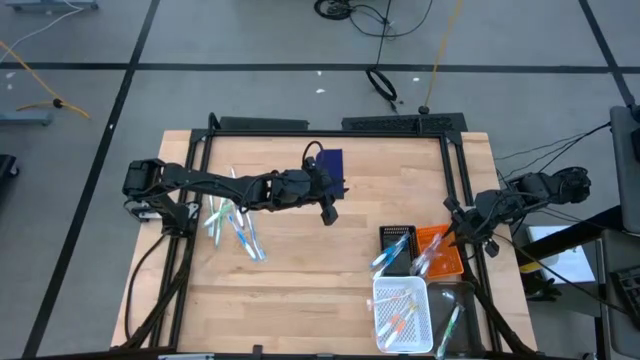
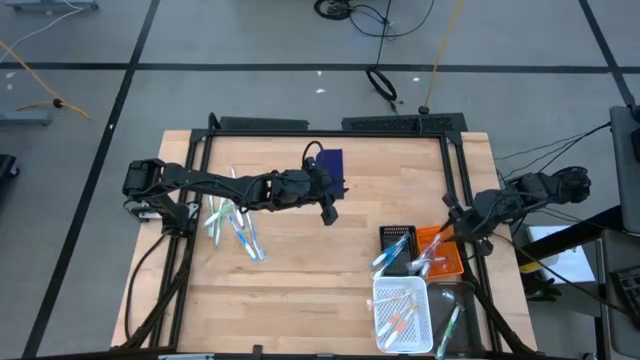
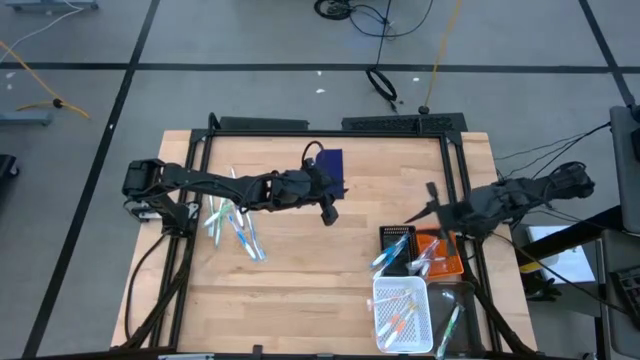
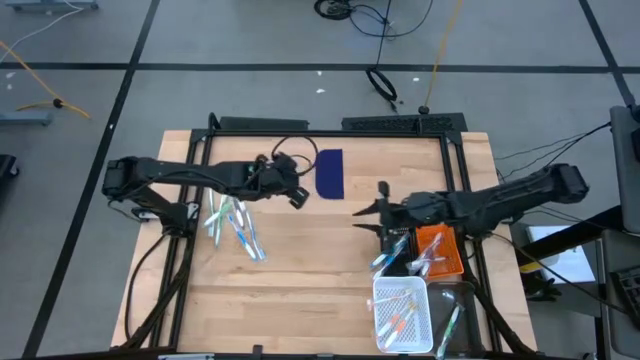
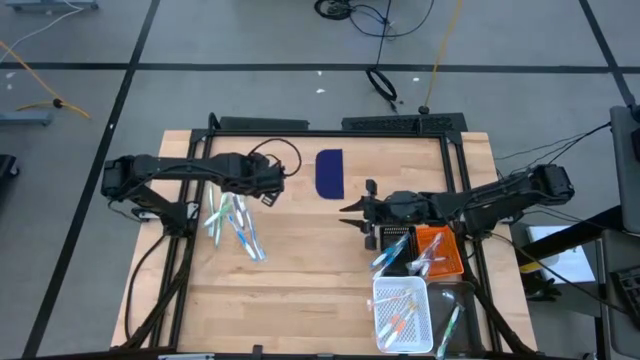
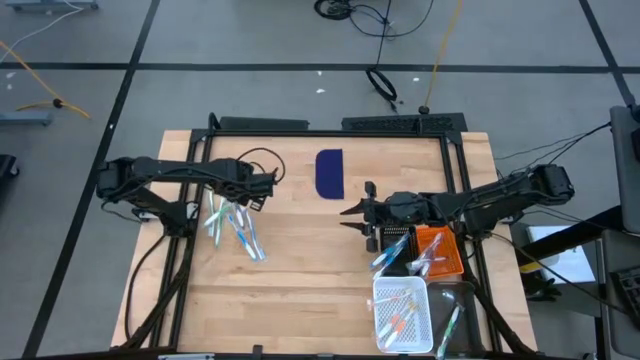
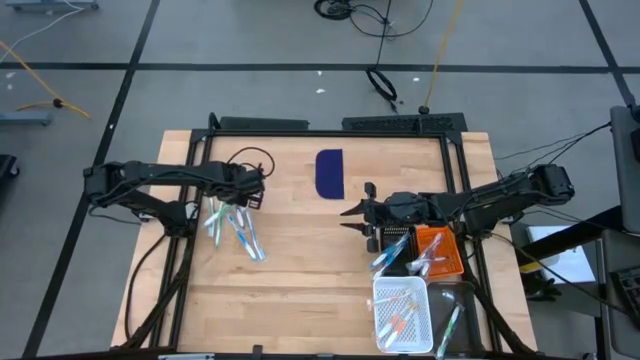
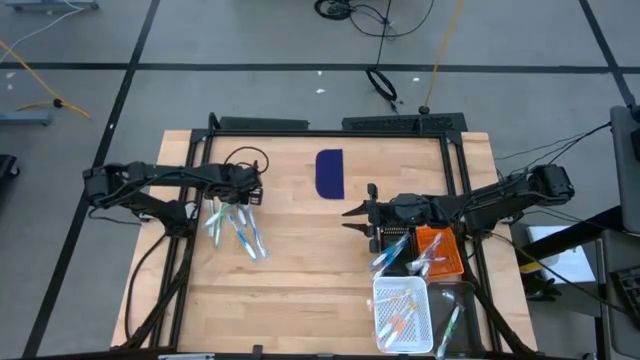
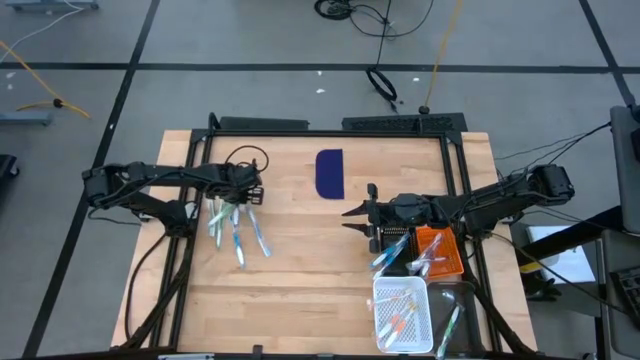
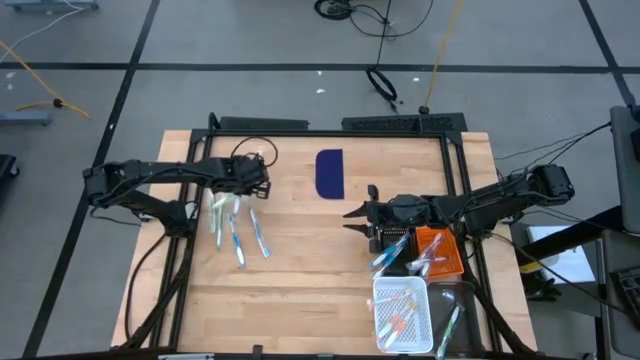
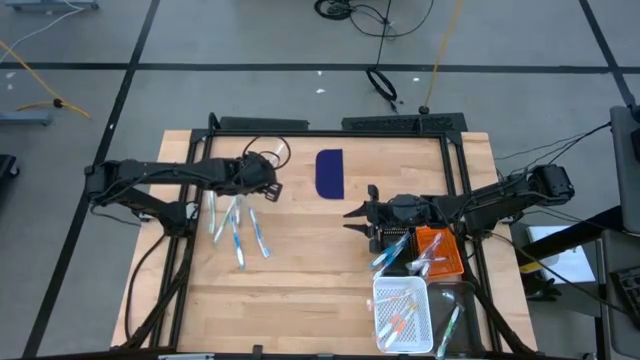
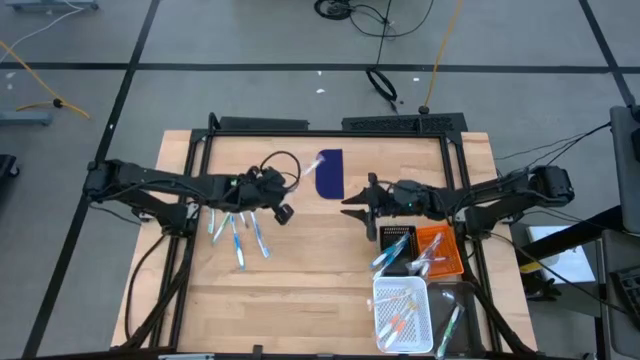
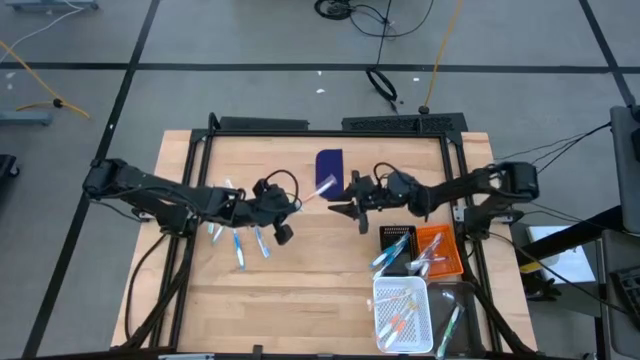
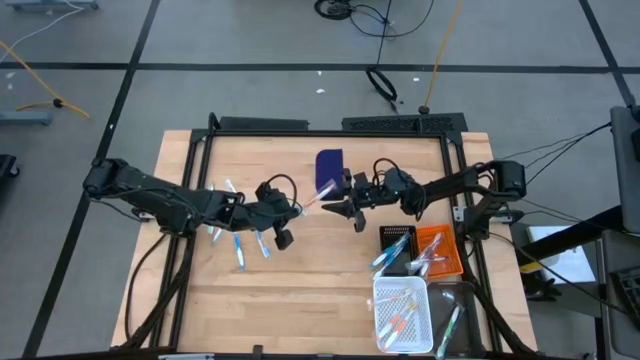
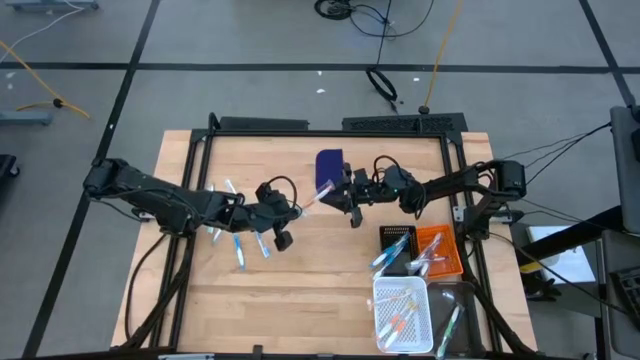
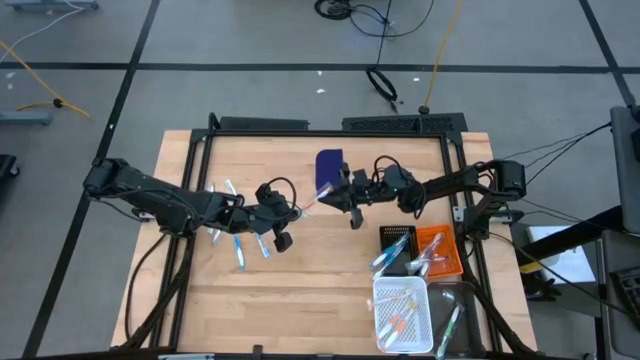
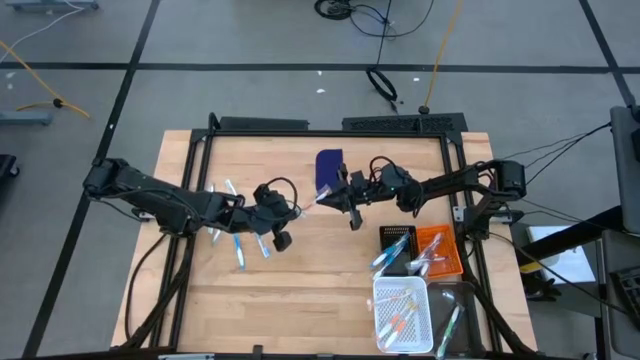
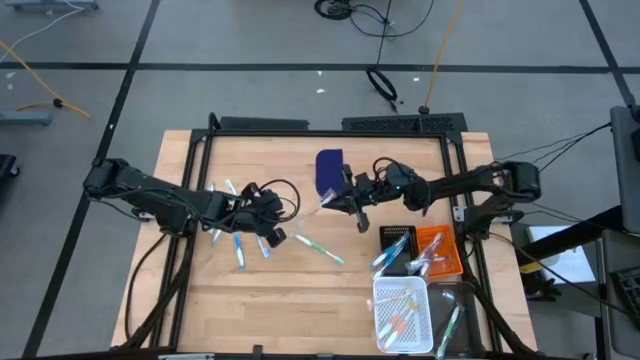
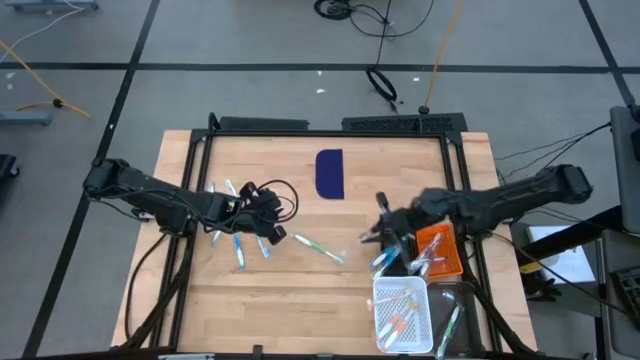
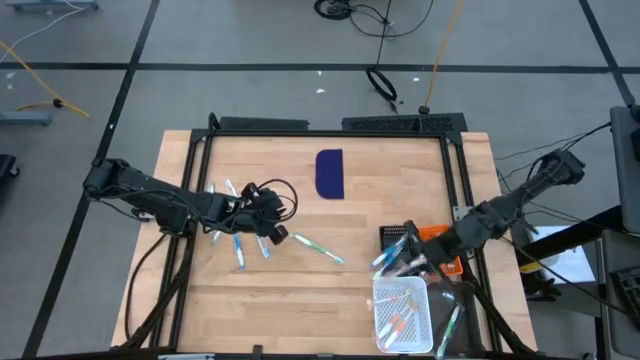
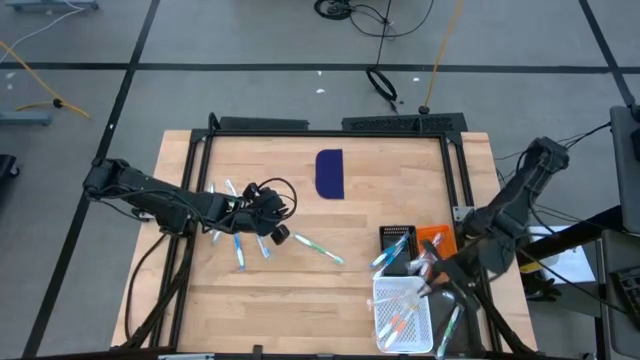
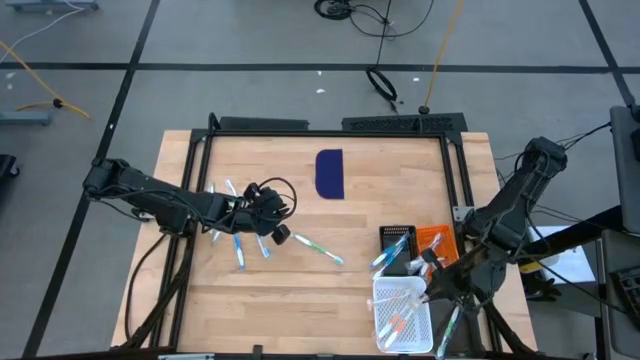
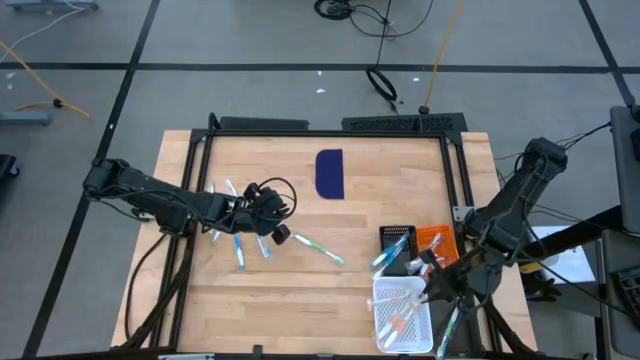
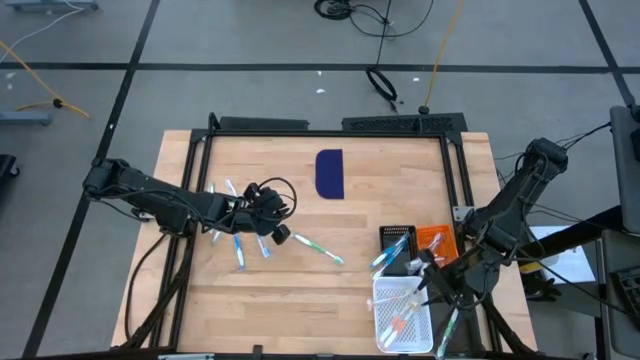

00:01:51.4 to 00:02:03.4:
Task: Pick & Place Toothbrushes
Put the orange toothbrush into the white bin

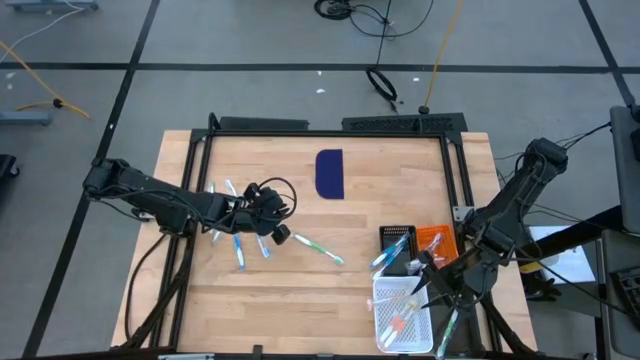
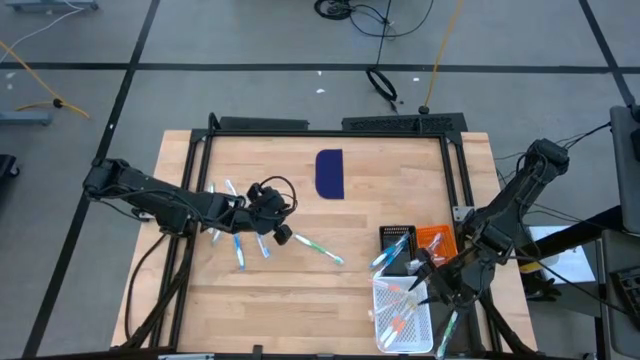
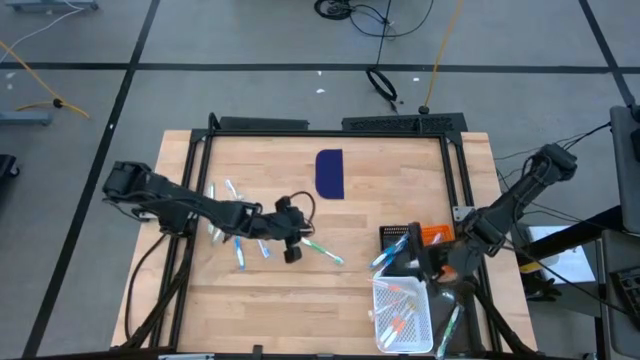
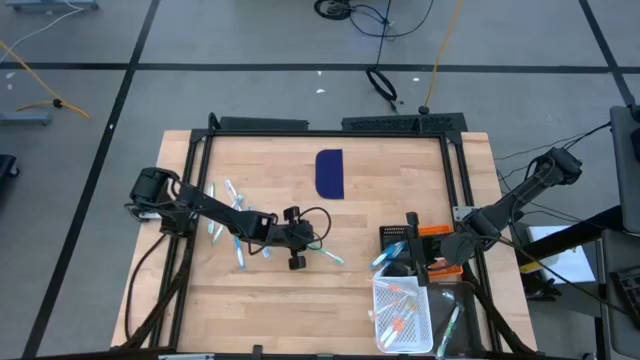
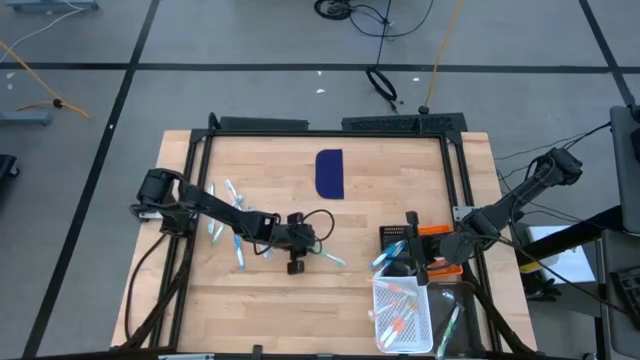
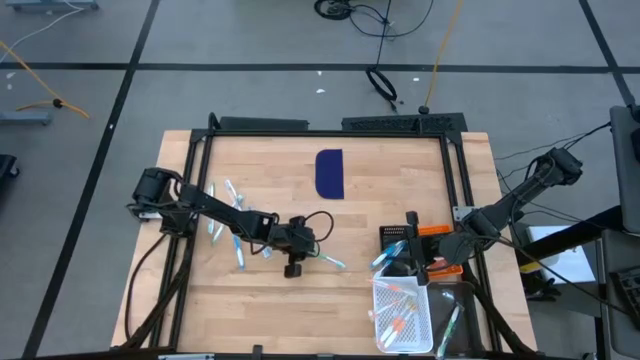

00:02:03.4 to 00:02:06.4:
Put the green toothbrush into the black bin

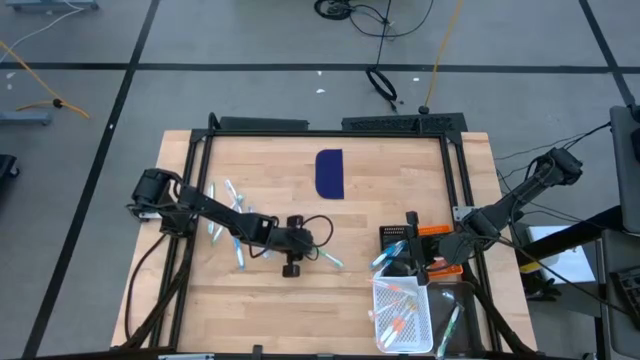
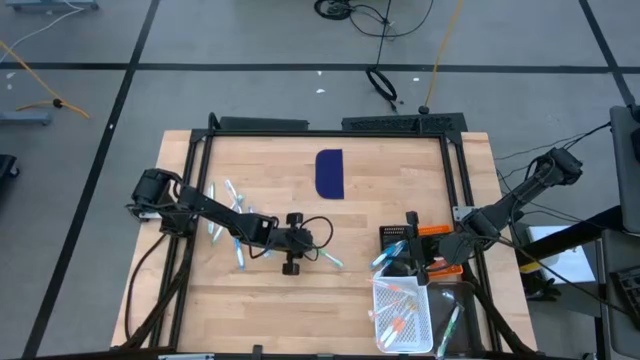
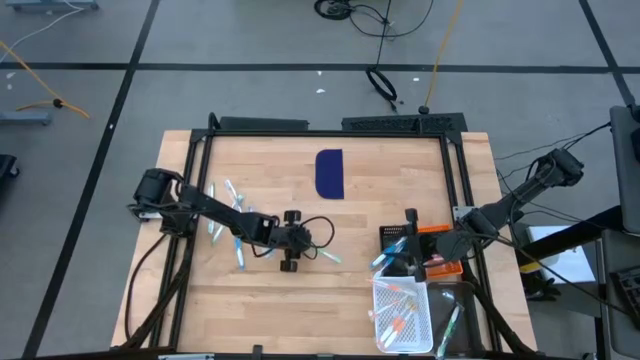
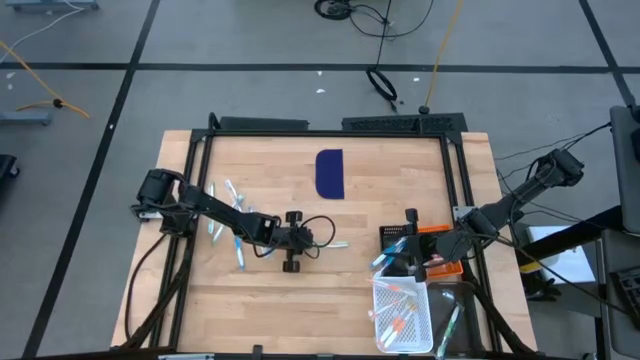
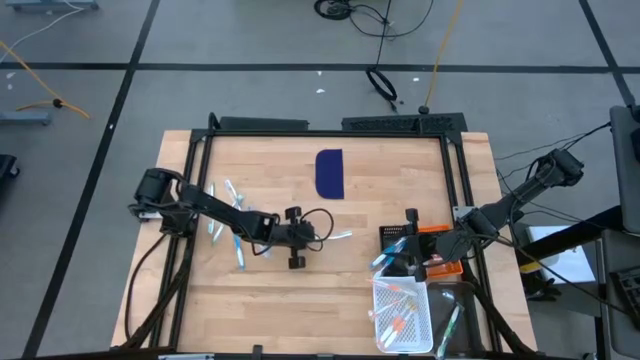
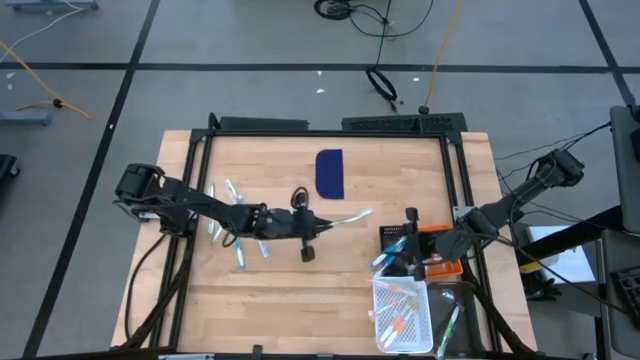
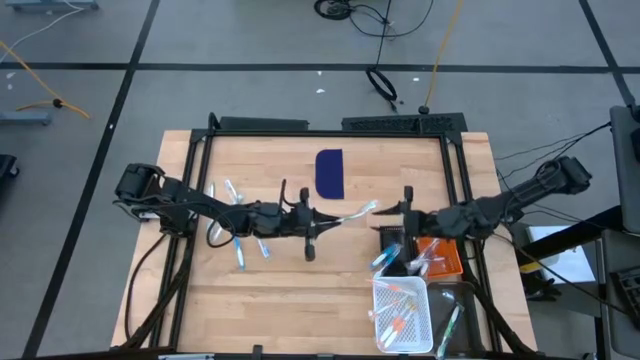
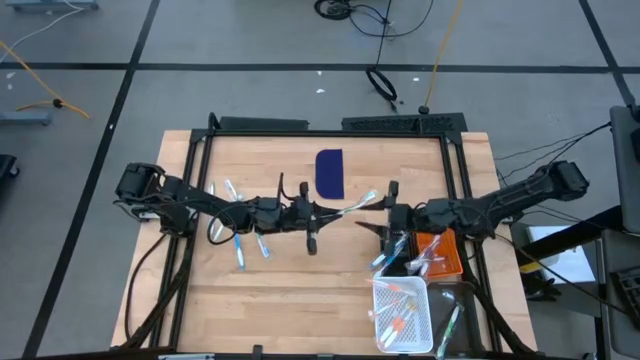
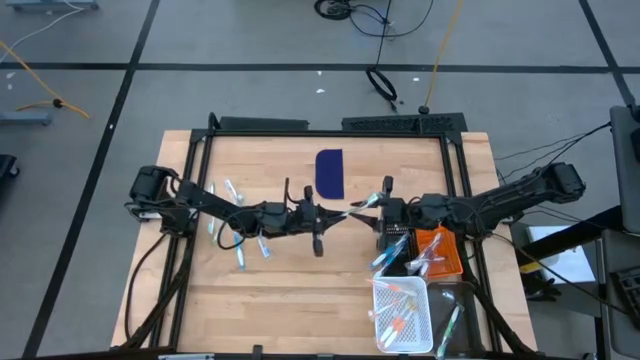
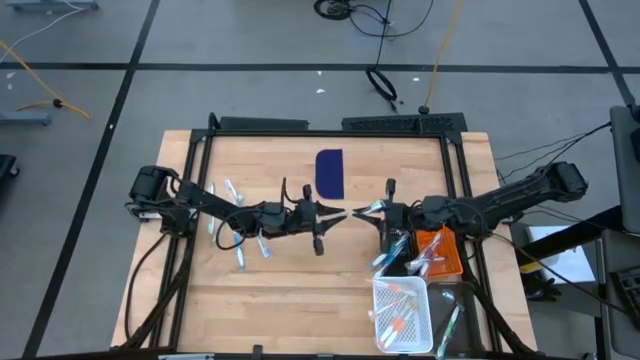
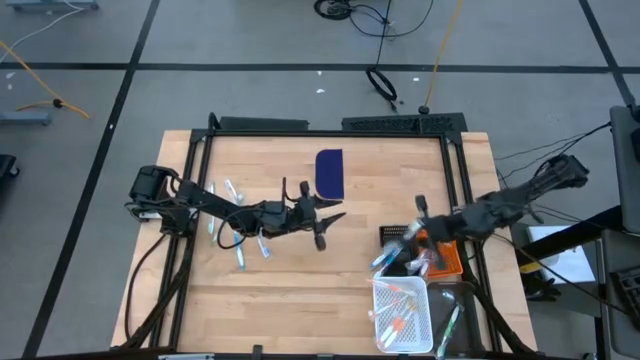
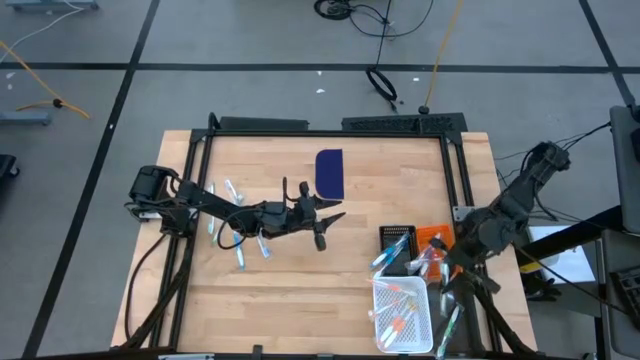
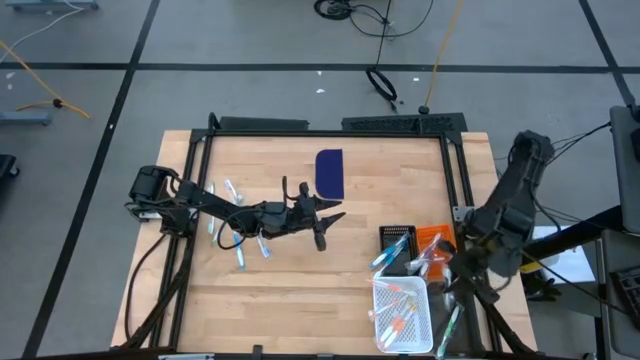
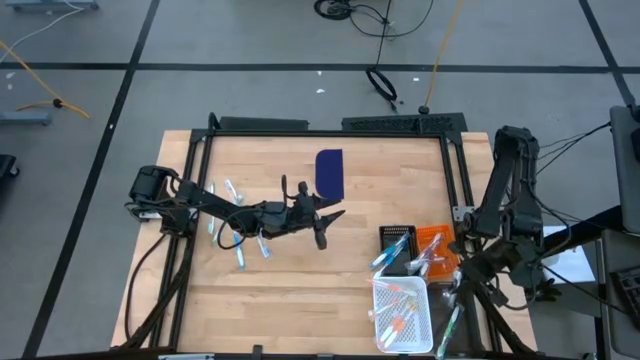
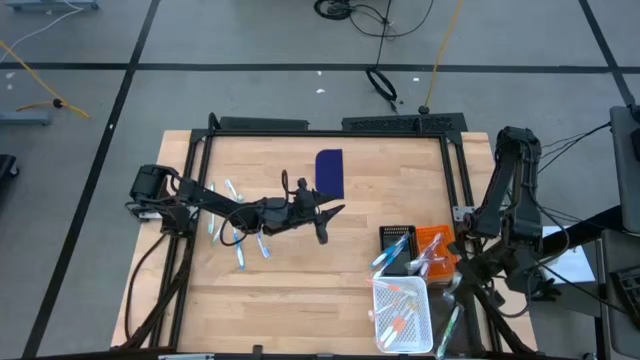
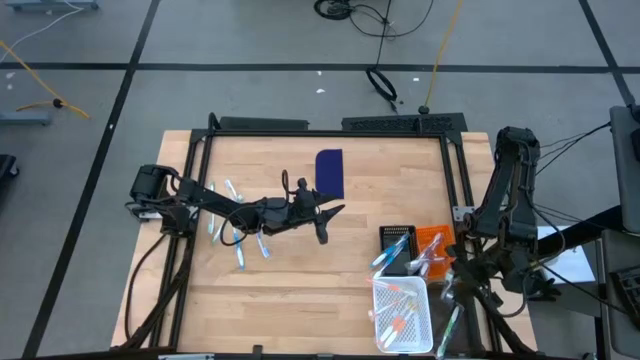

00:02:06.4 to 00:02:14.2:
Put the green toothbrush into the black bin
